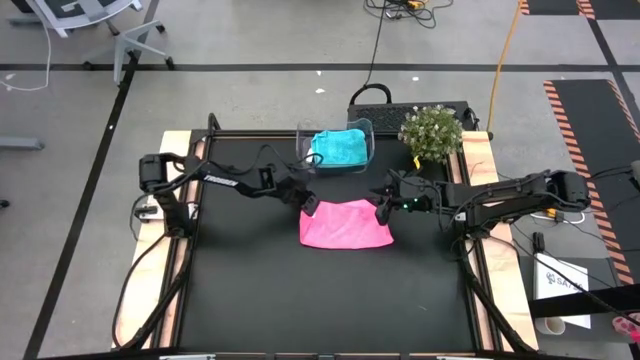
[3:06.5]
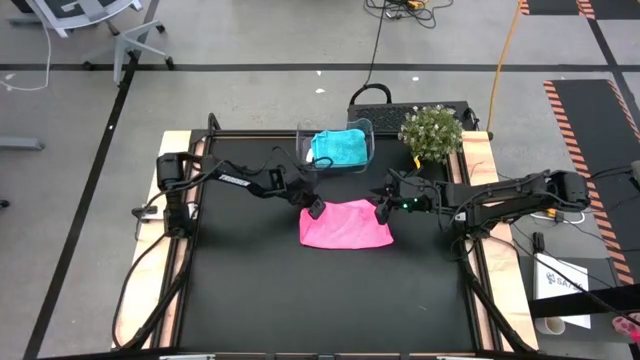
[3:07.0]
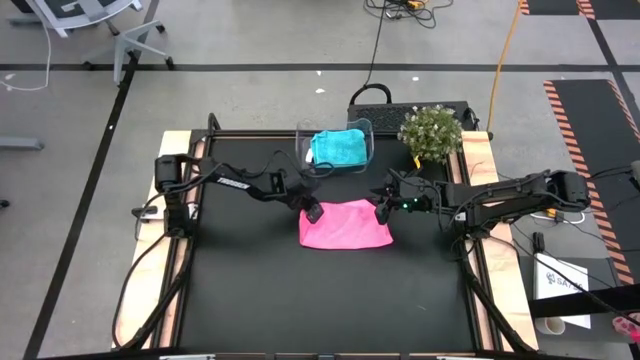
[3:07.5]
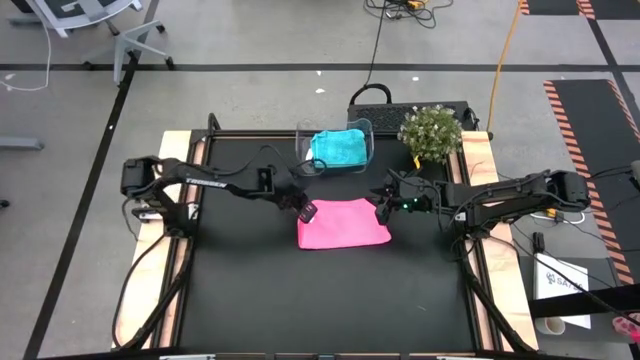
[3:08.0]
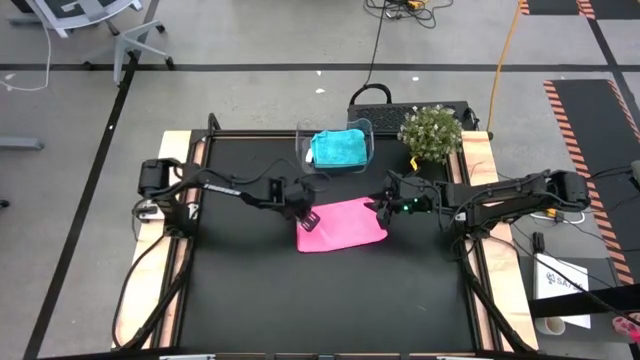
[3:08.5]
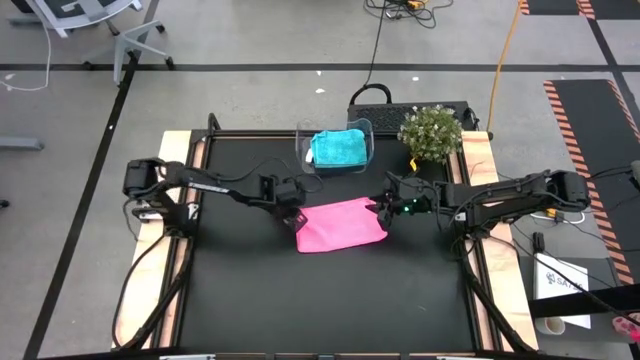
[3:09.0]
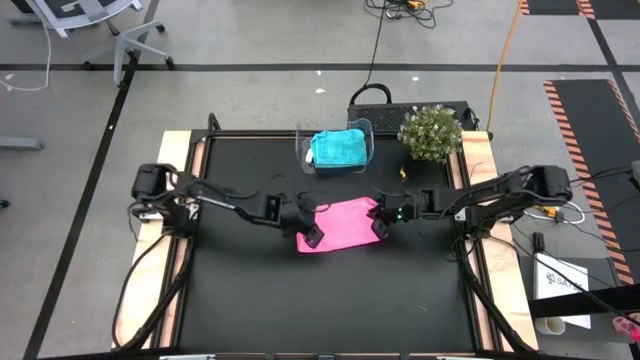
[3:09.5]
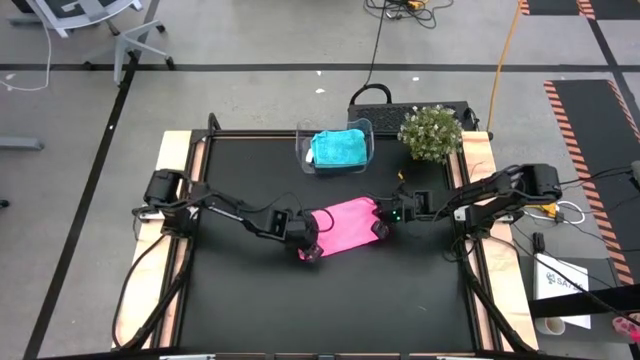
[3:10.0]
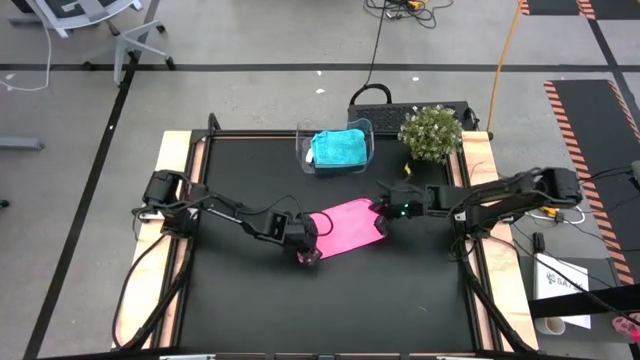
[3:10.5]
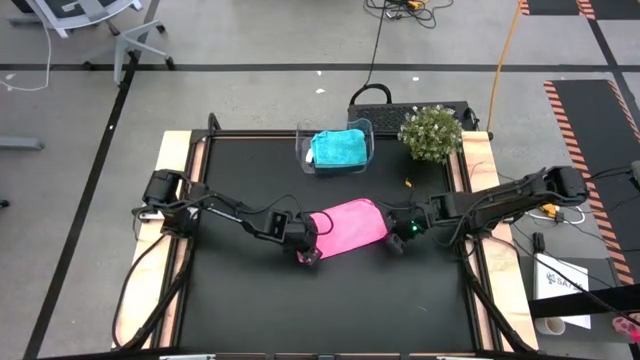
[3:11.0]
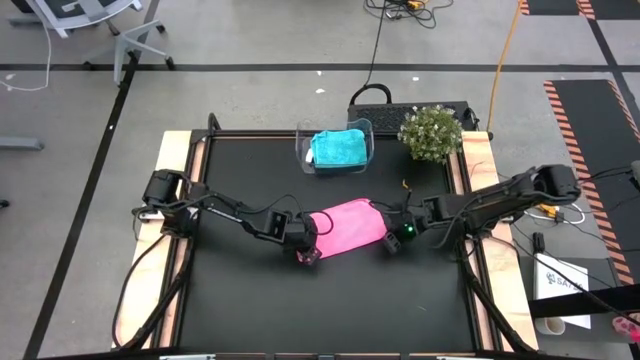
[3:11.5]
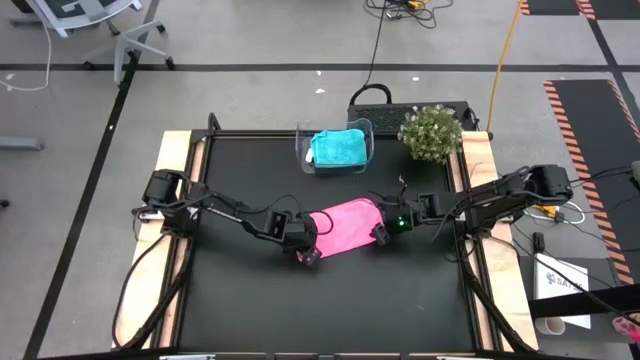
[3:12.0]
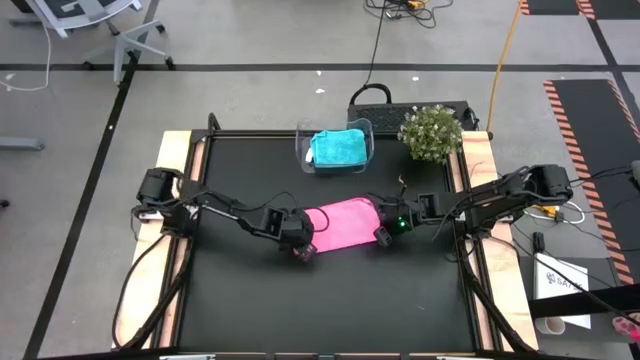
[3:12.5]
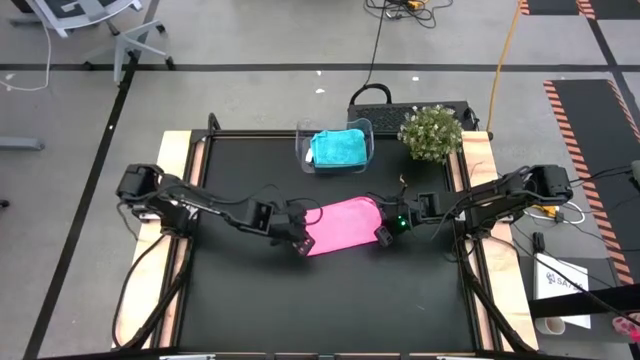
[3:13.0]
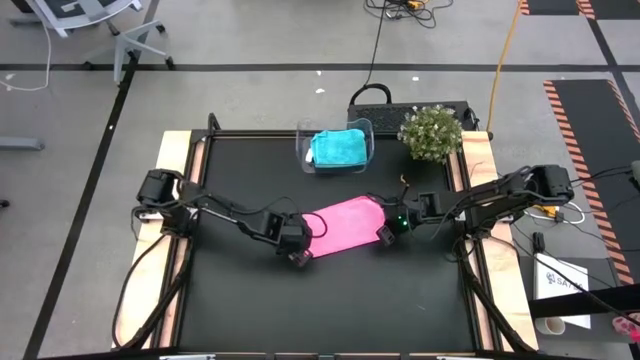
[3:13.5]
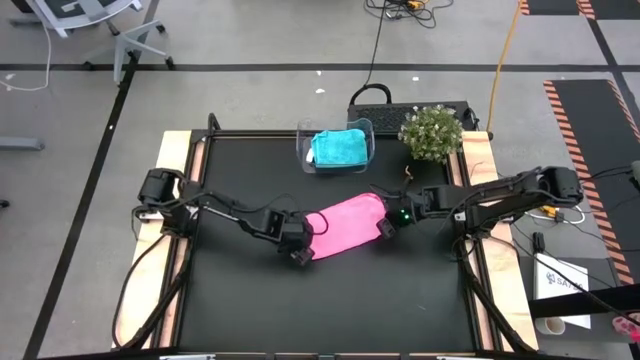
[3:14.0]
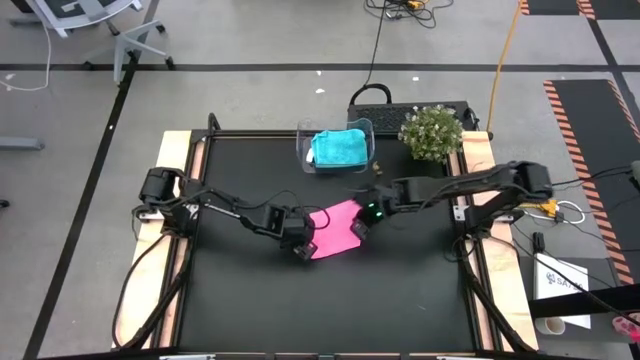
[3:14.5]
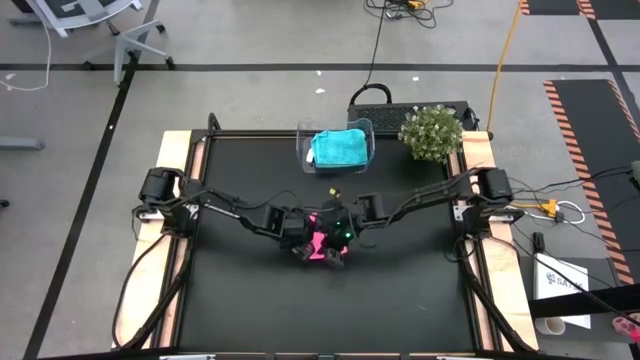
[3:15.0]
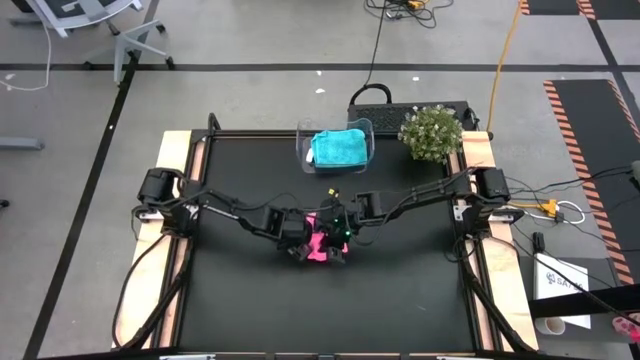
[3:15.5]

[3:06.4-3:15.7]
Task: Fold microfiber towels
Fold the pink microfiber cloth

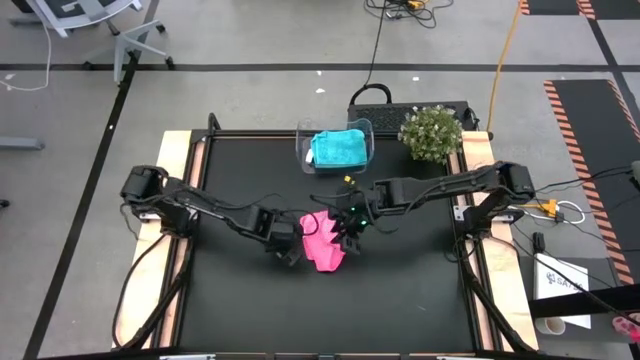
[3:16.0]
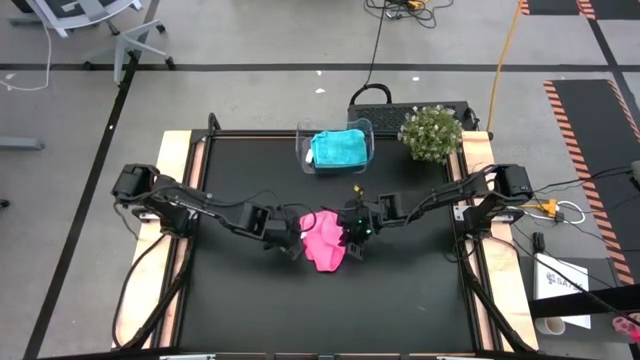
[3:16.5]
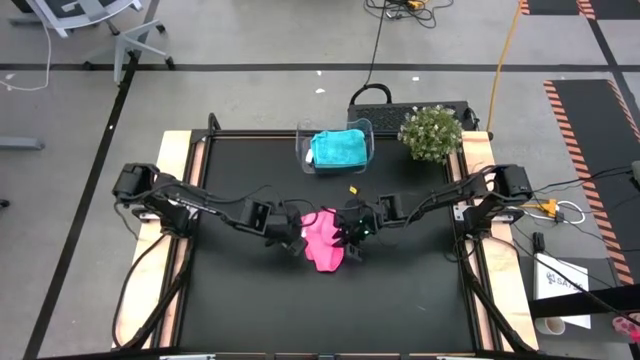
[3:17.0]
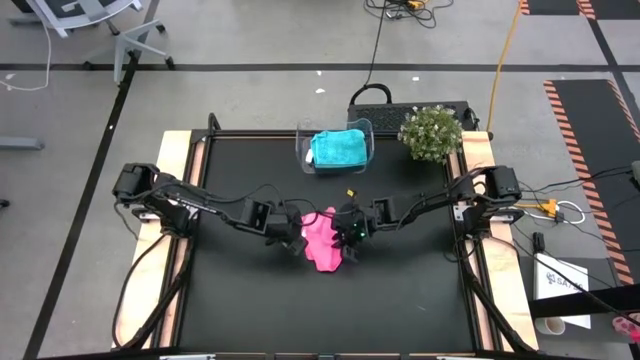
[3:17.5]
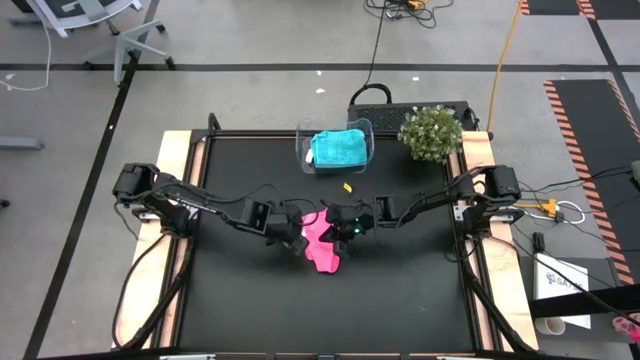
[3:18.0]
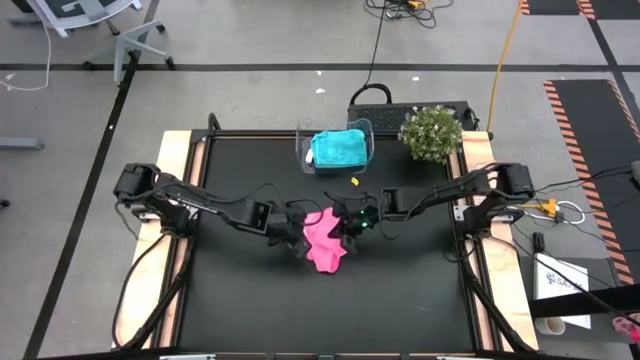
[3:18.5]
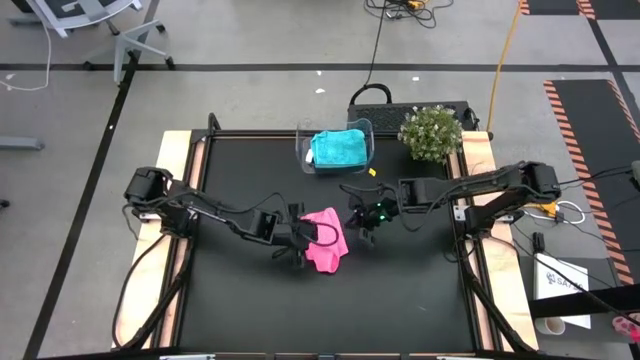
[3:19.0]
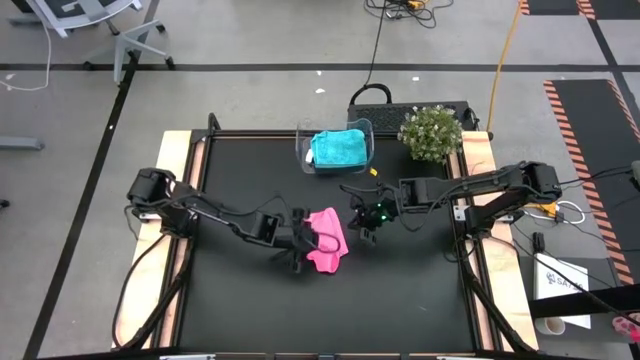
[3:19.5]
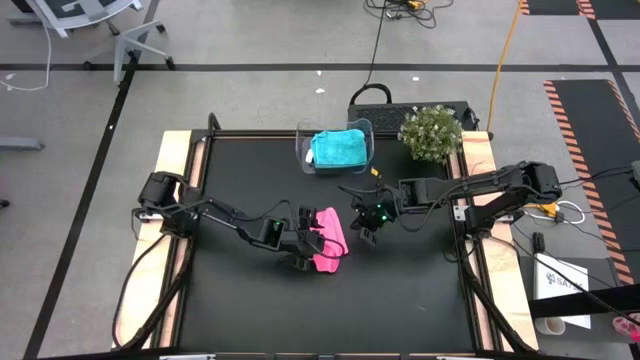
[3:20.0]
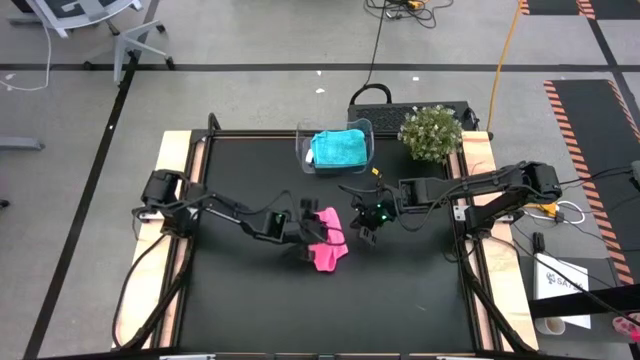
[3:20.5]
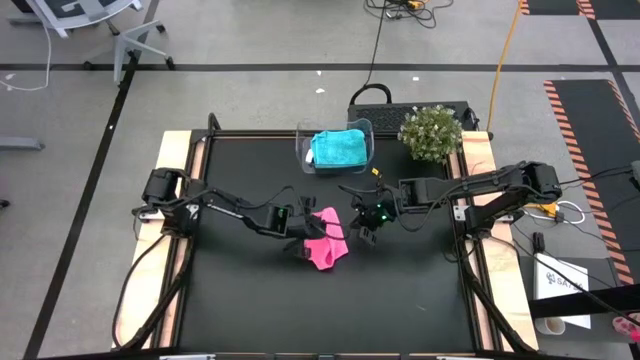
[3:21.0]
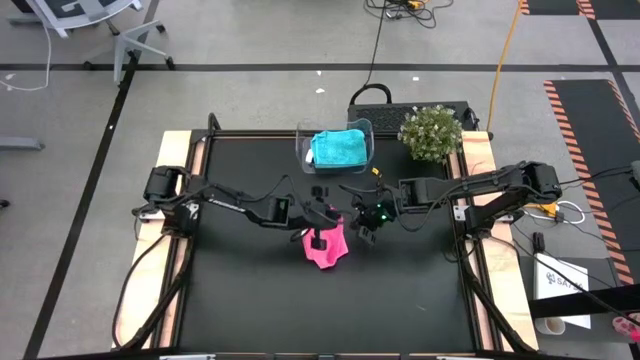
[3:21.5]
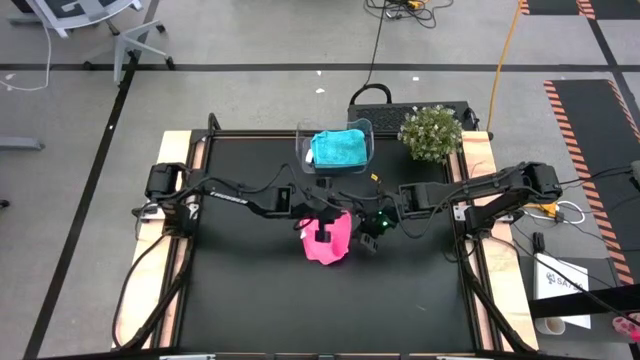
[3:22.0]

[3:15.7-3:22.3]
Fold the pink microfiber cloth

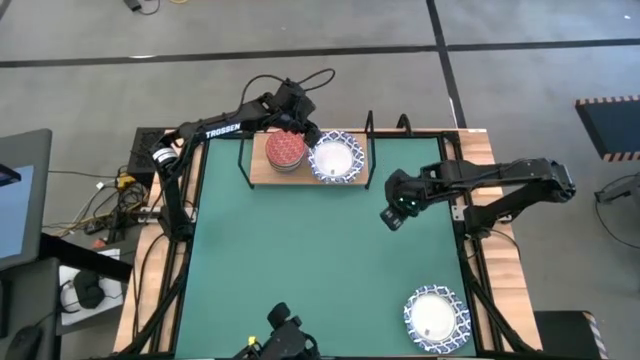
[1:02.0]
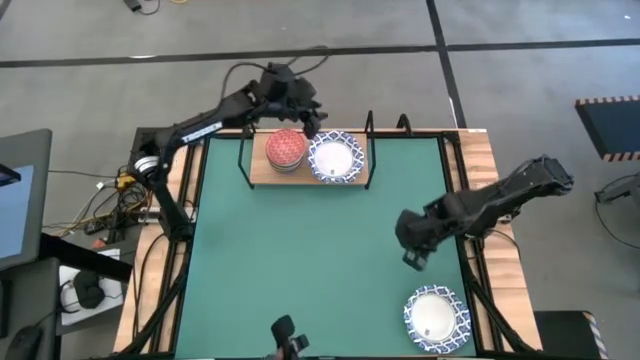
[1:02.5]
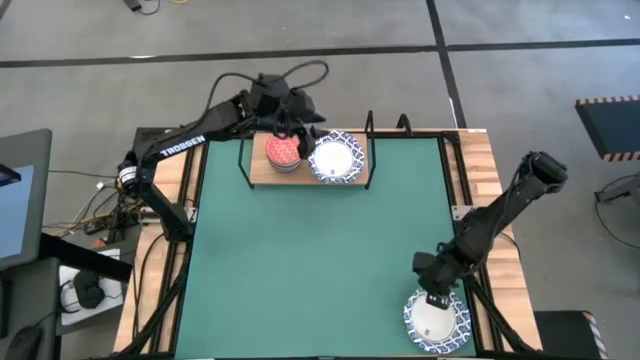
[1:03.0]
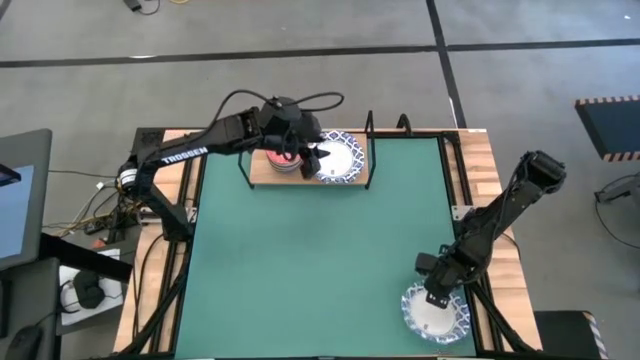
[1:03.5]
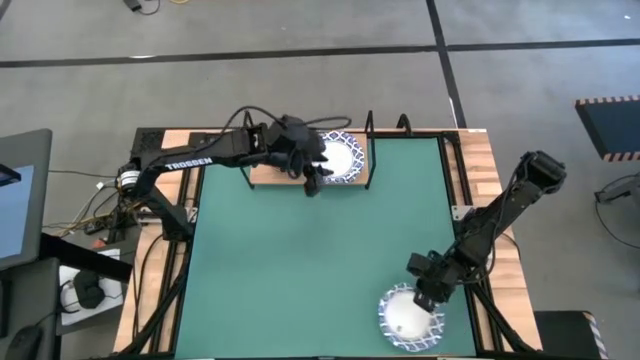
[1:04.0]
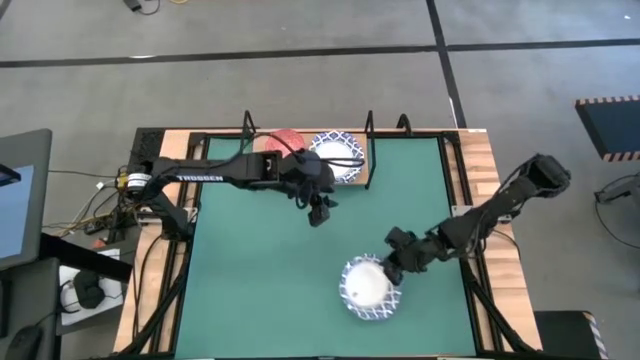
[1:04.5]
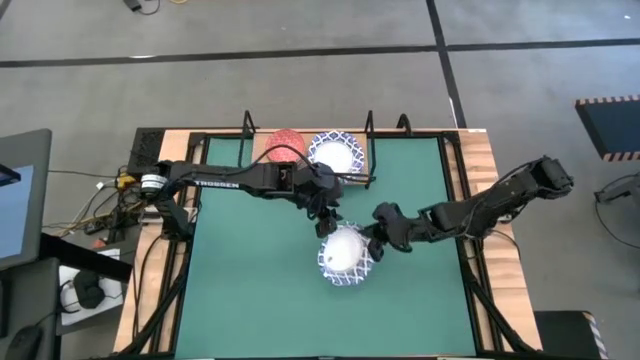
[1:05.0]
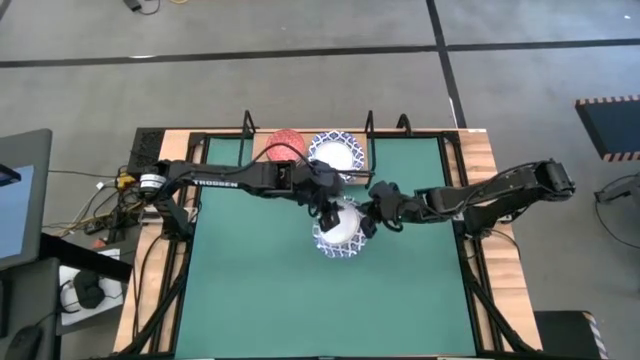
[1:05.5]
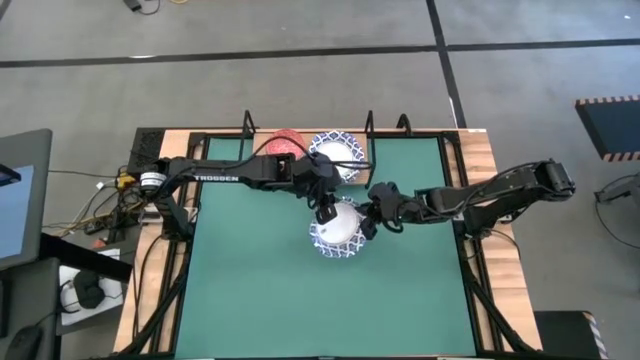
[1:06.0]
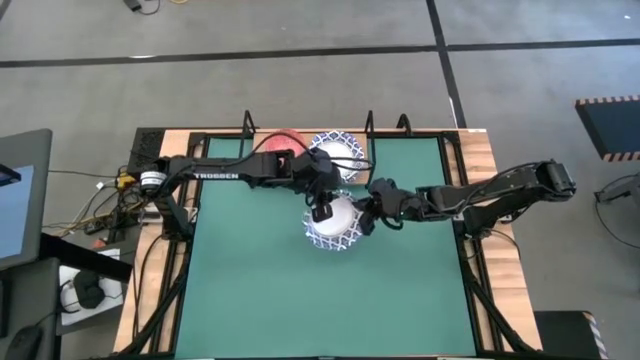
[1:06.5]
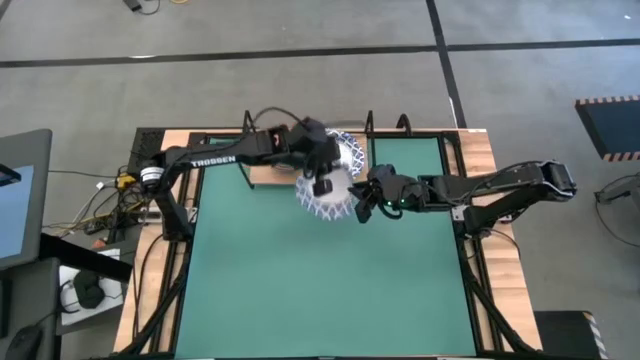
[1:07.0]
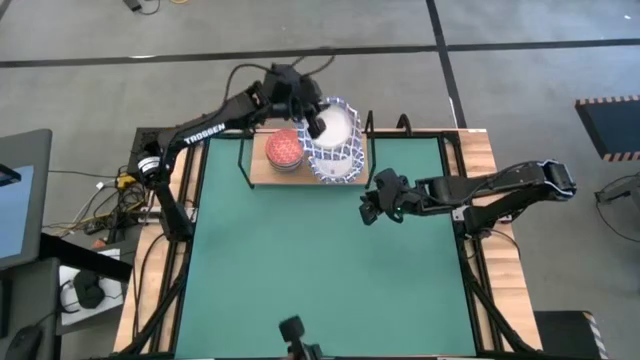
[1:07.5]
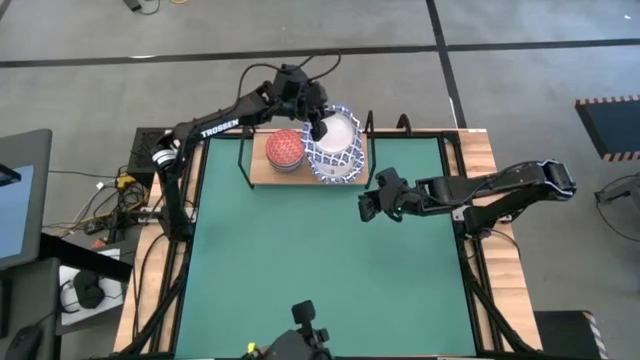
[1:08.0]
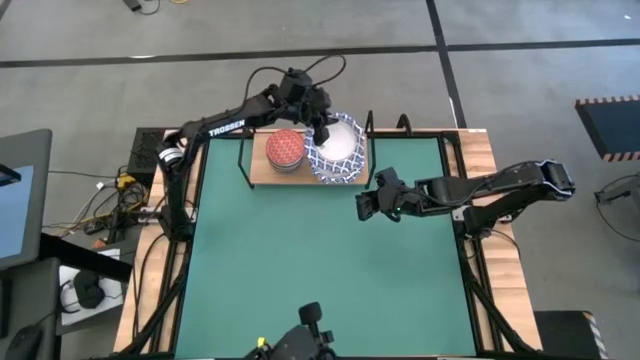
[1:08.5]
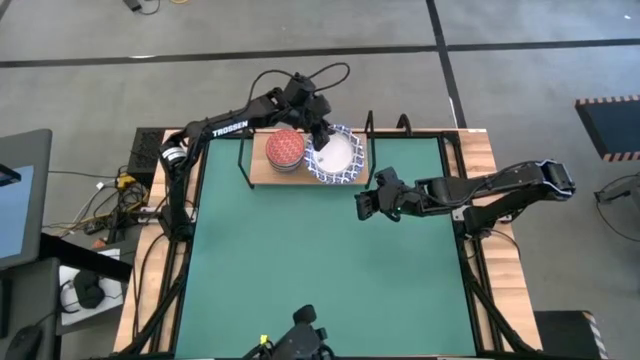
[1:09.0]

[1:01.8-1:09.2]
Task: Place and stack bowls onto a shelf
Stack the white blue bowl on top of the white blue bowls on the shelf
